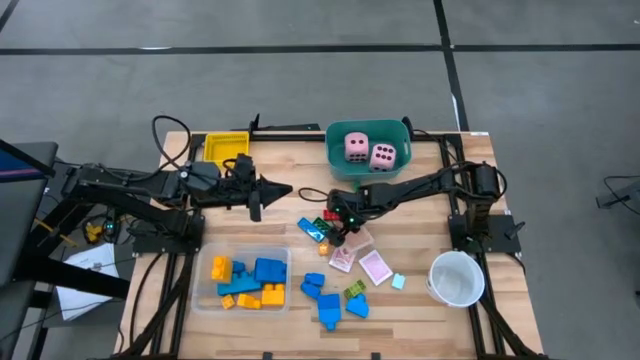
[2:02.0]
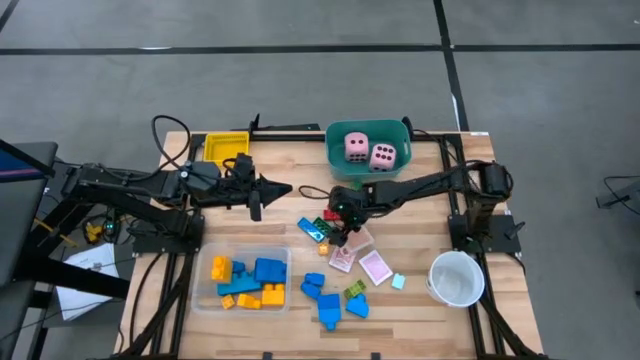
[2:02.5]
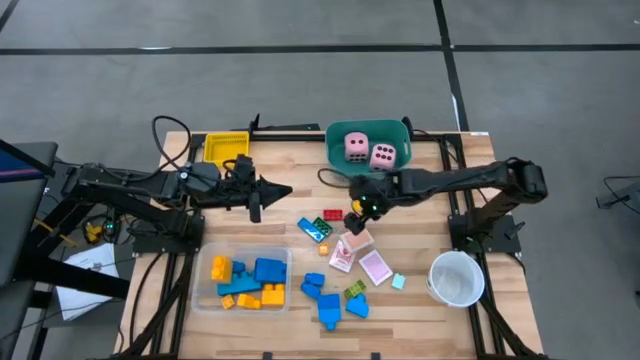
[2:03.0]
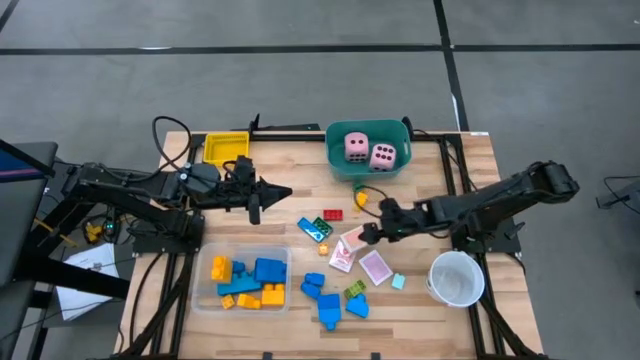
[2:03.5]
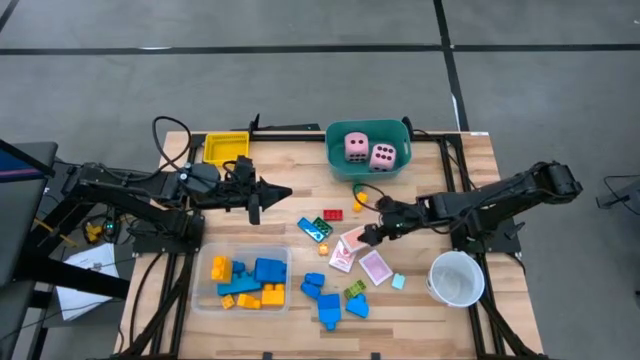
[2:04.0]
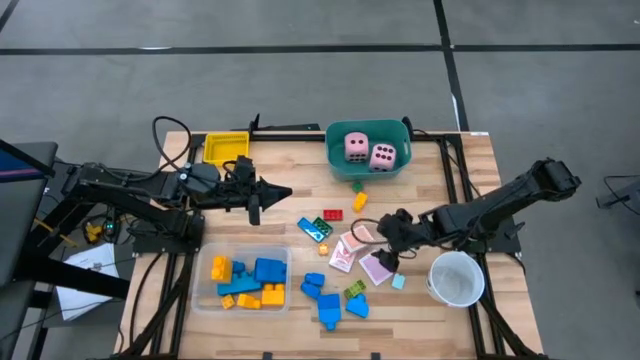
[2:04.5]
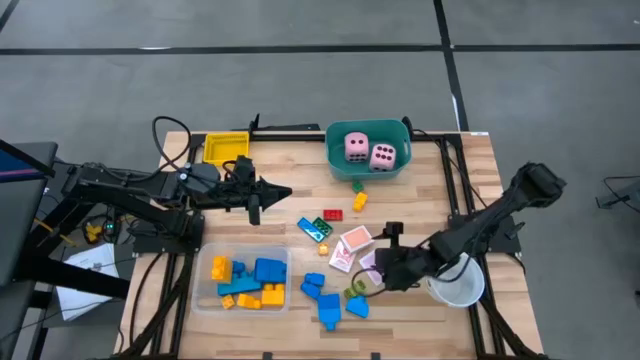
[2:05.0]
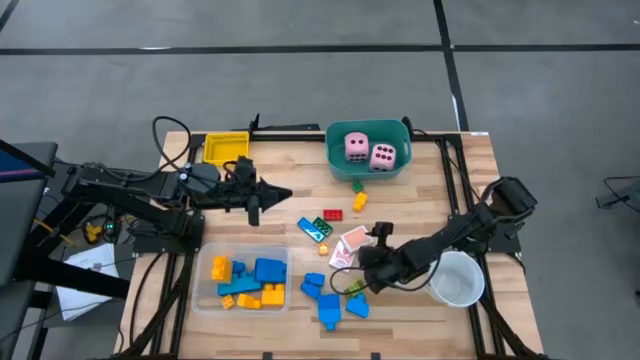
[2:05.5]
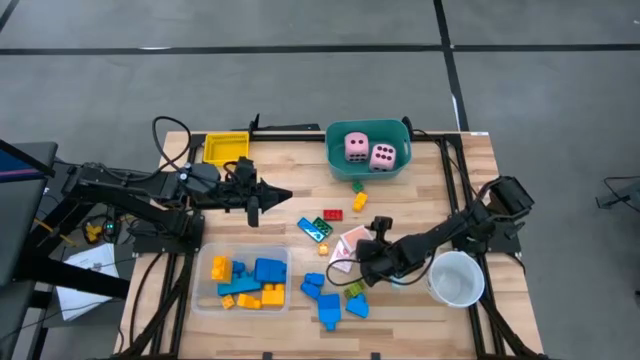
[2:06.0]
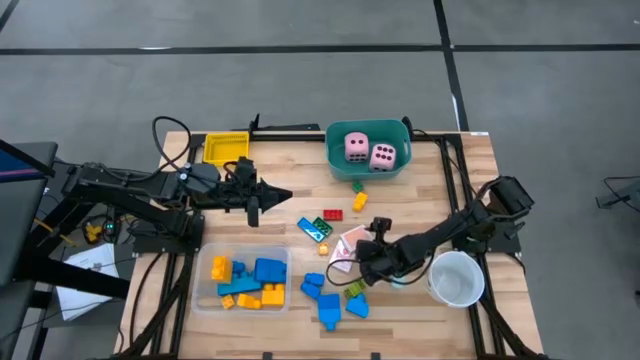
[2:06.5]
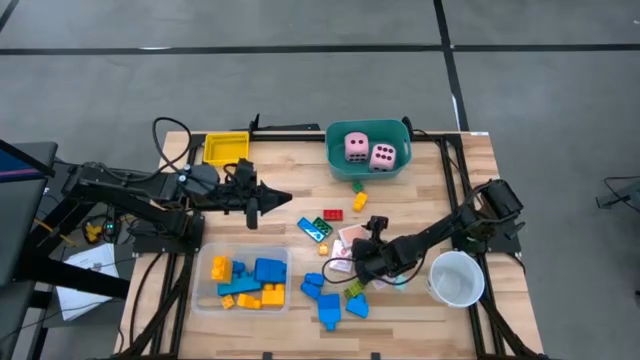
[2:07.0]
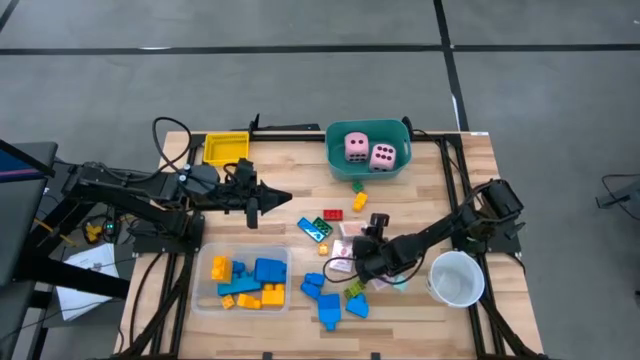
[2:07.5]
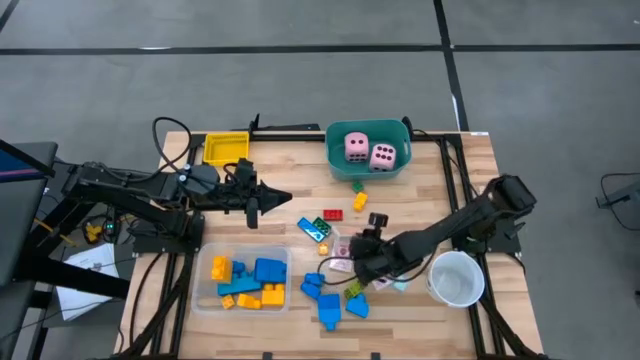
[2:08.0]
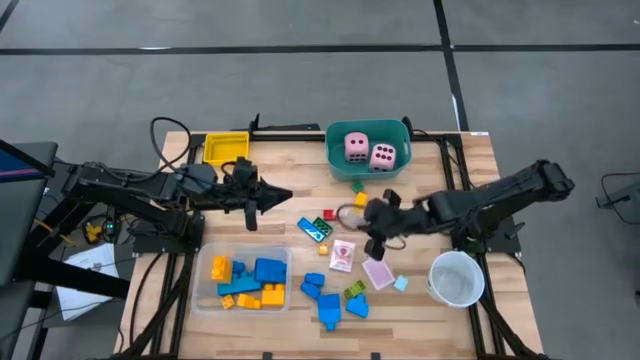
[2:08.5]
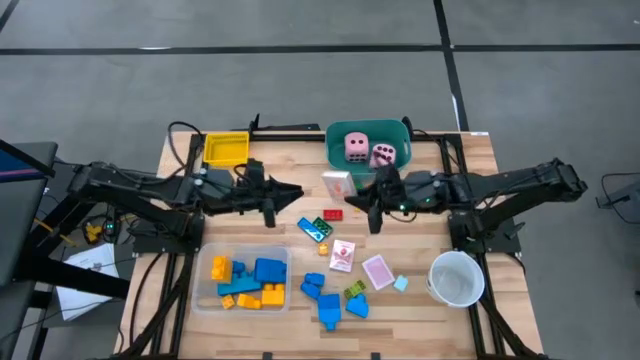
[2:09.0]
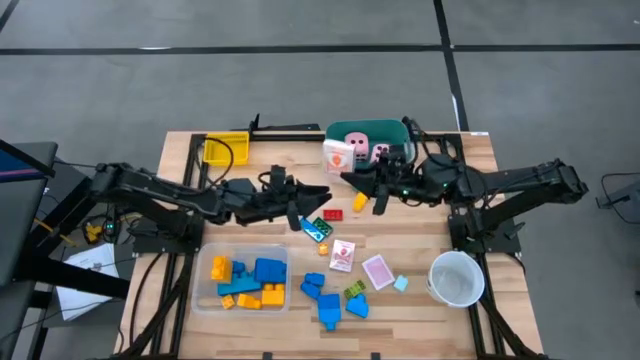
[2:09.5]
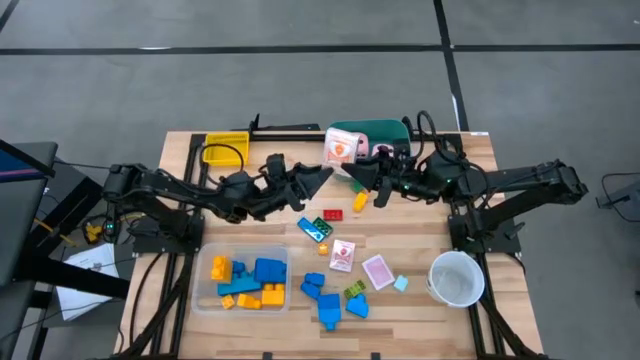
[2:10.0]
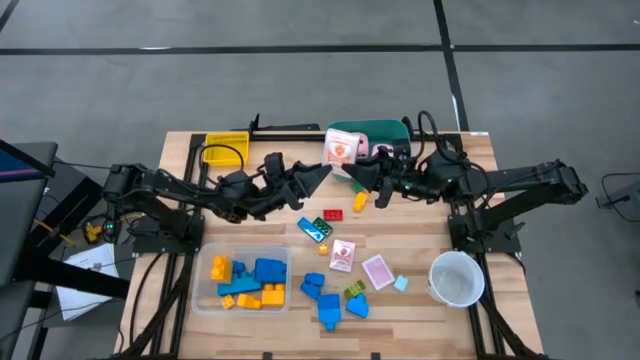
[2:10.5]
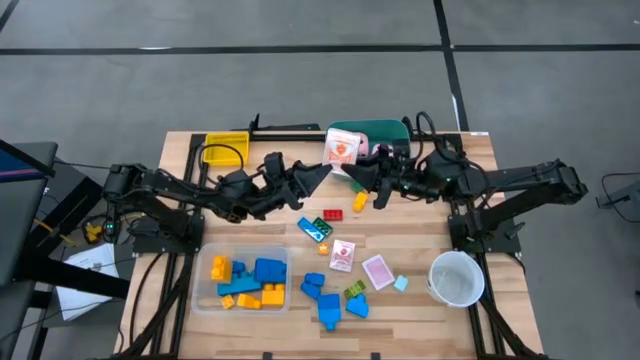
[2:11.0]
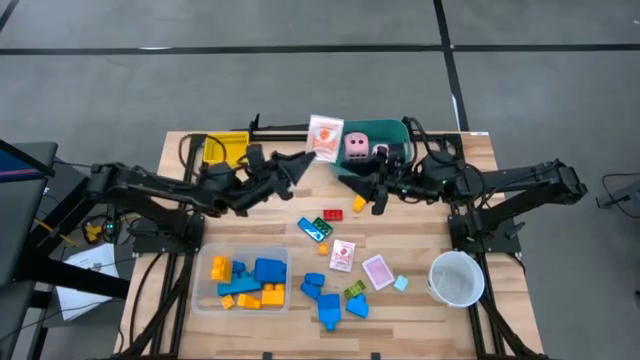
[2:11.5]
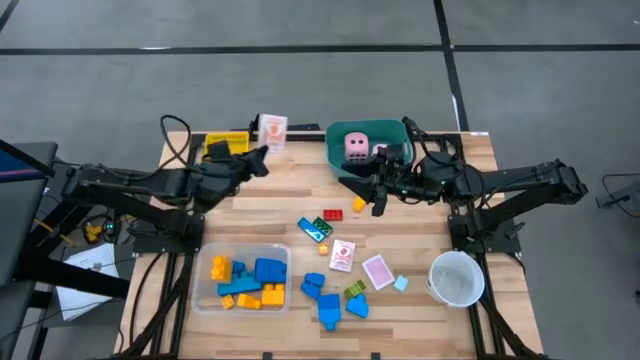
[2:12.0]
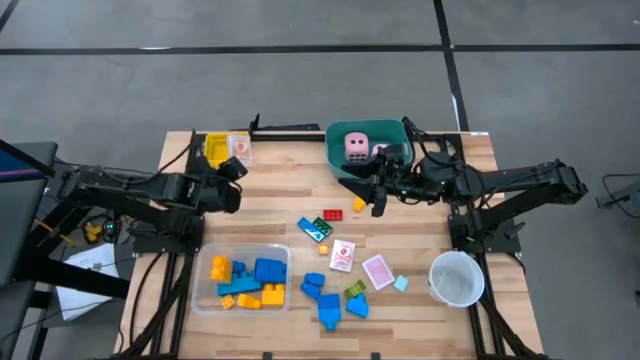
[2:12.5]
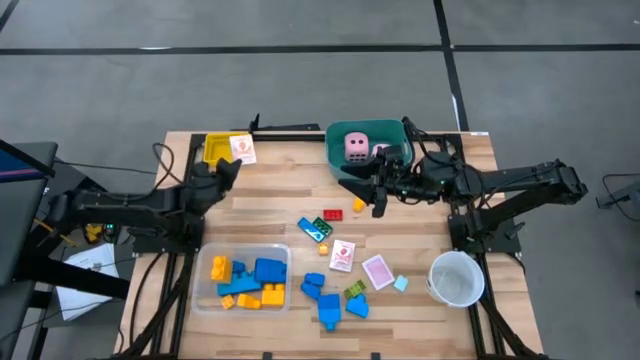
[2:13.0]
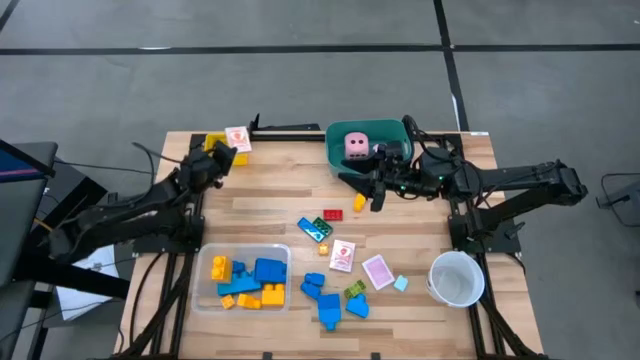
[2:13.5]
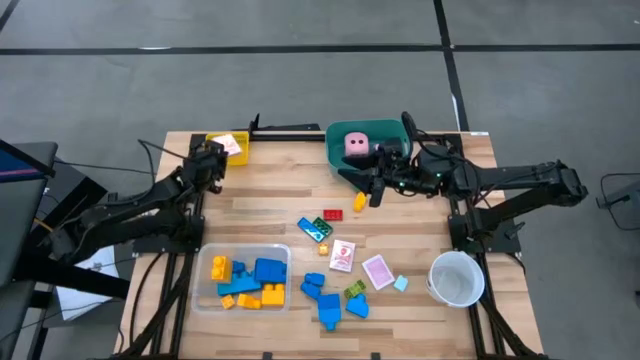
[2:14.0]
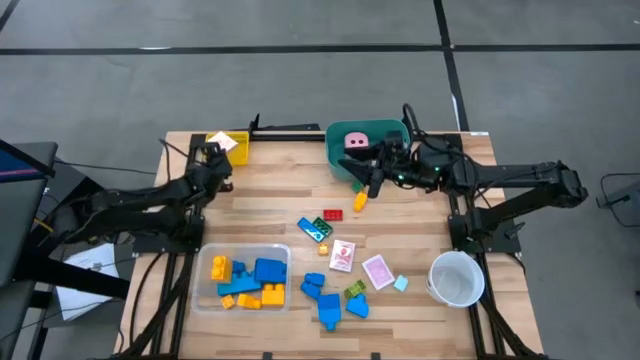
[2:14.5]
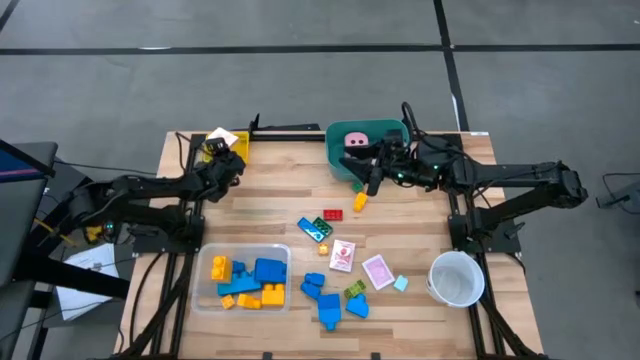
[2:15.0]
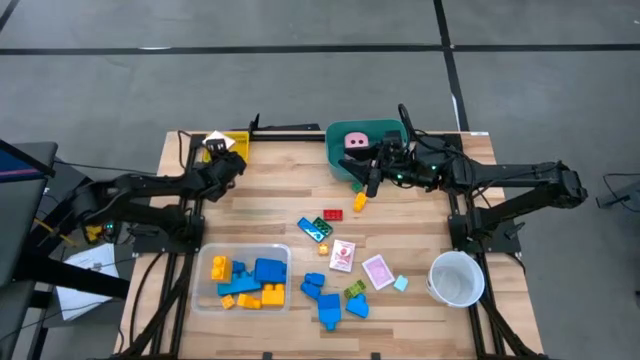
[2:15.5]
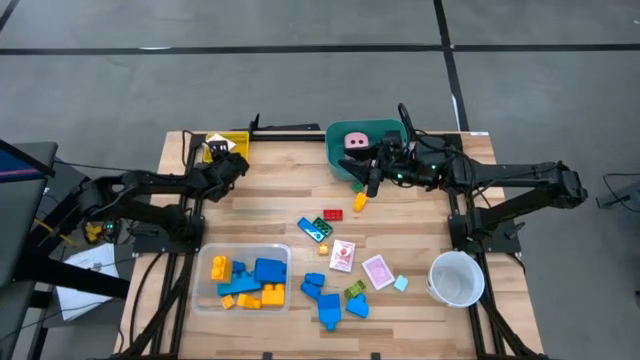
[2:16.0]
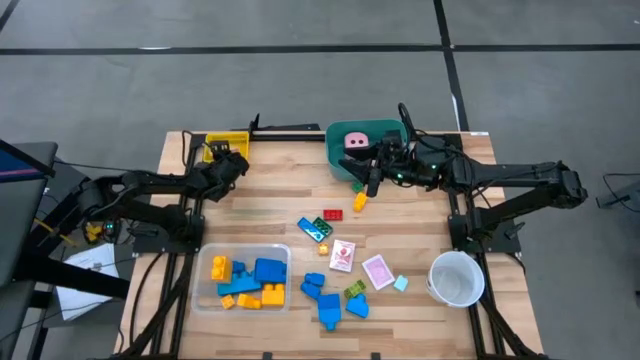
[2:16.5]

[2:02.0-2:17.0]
Task: Pick & Place Toys
Put the orange playing card into the yellow bin

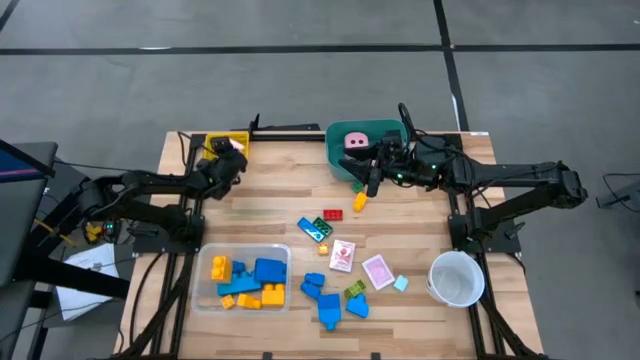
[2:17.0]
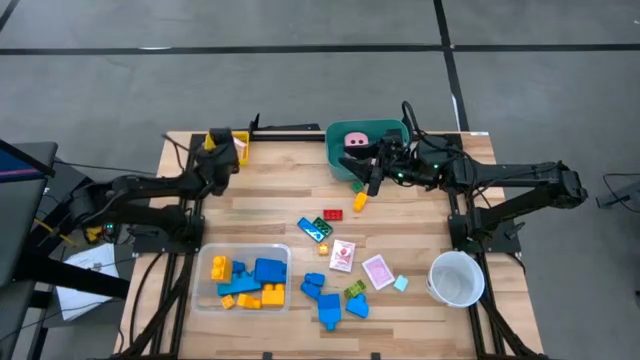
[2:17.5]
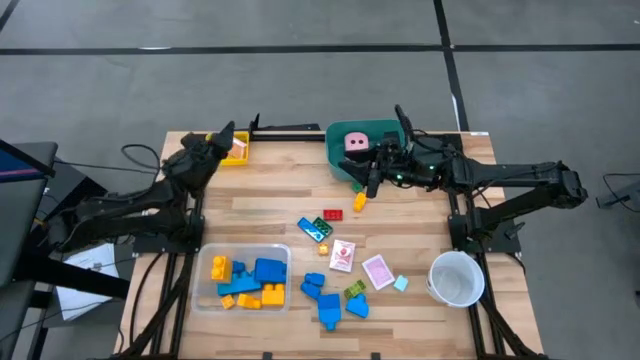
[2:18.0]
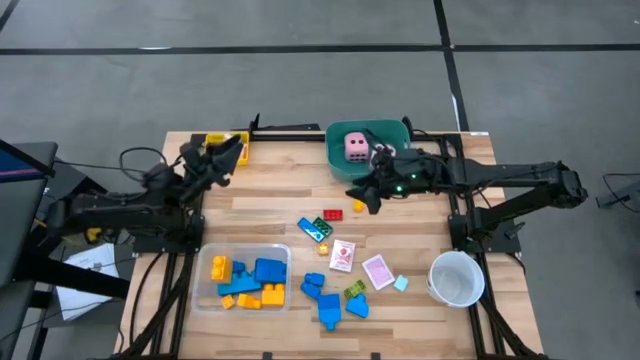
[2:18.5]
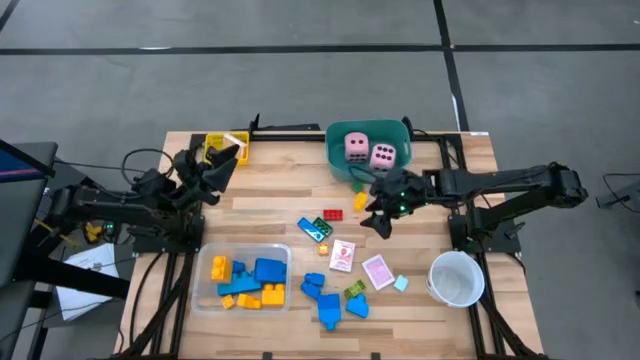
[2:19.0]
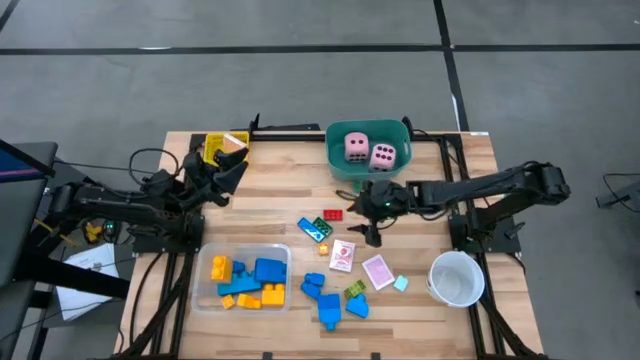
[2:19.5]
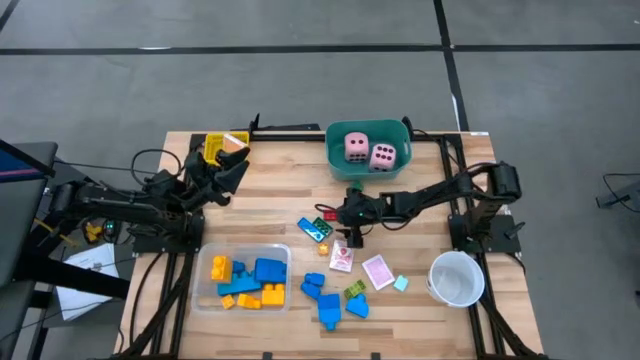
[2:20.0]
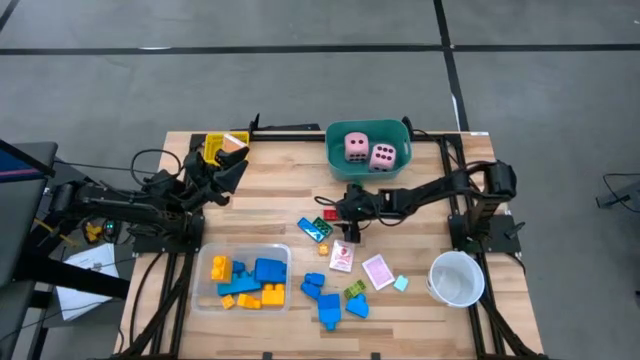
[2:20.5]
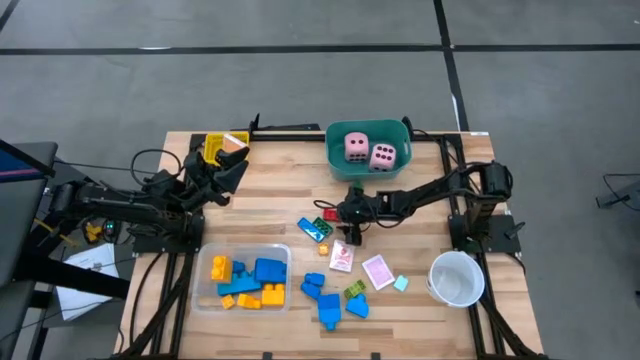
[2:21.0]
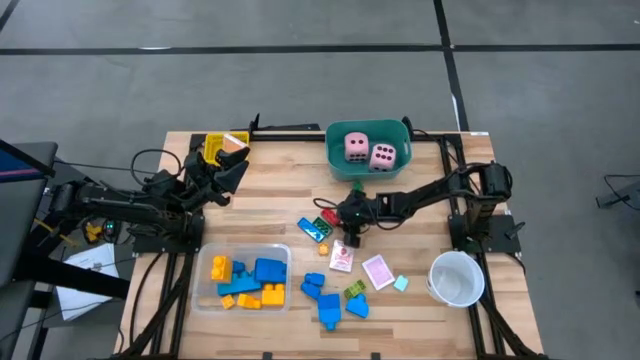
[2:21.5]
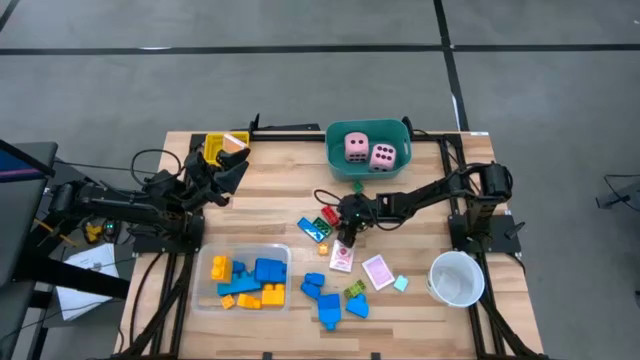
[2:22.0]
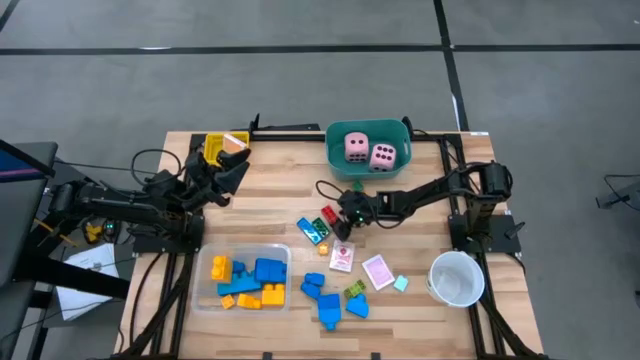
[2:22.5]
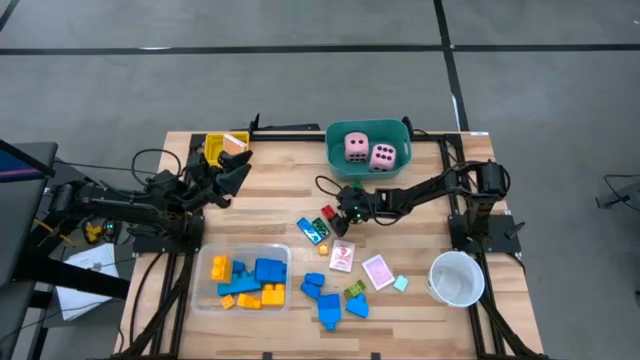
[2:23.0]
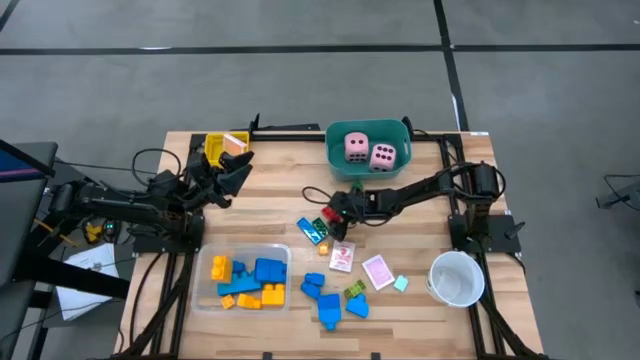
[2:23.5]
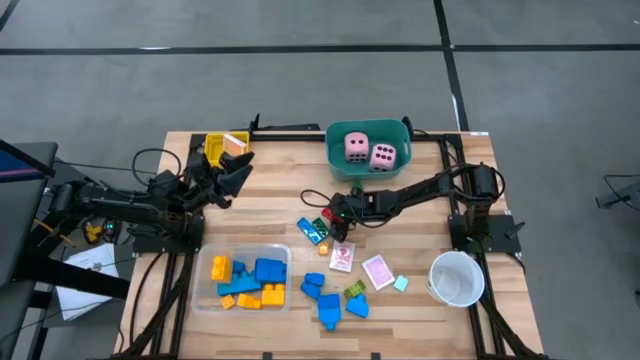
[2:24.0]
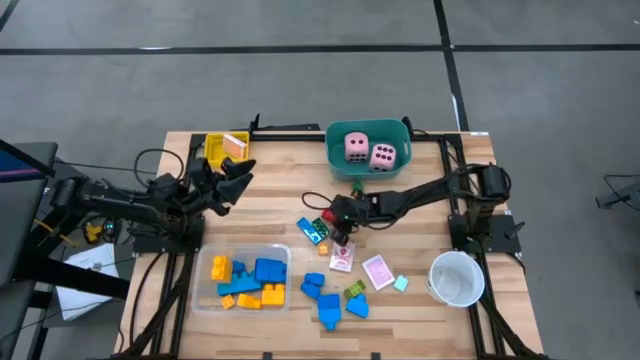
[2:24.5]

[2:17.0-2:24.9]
Put the red game piece into the transparent bin
